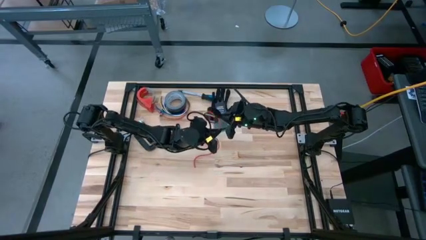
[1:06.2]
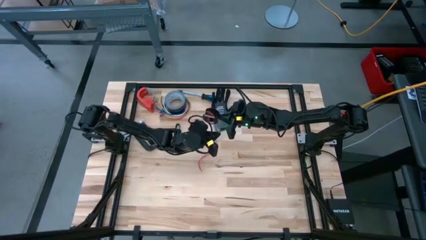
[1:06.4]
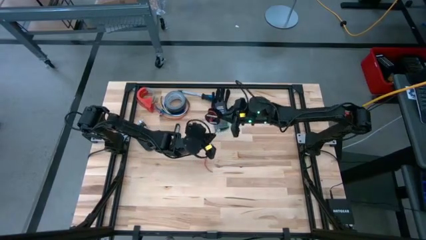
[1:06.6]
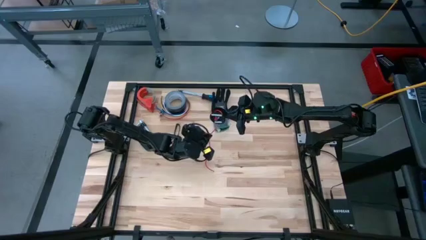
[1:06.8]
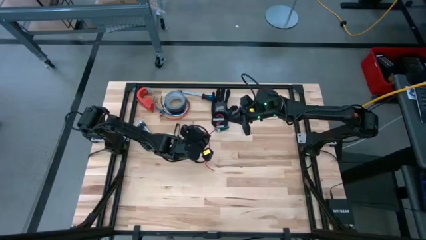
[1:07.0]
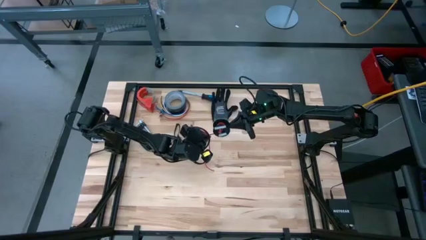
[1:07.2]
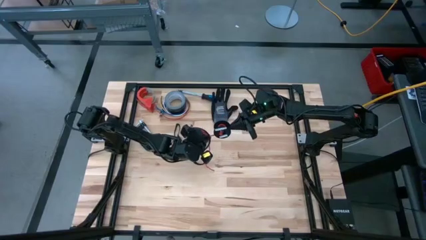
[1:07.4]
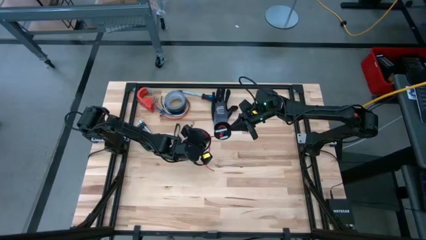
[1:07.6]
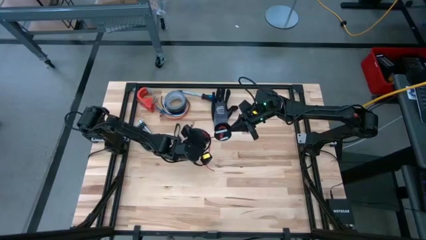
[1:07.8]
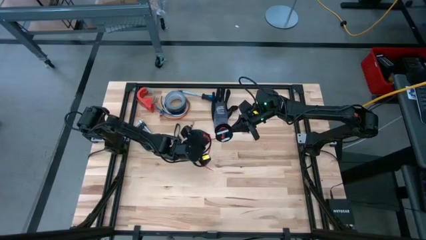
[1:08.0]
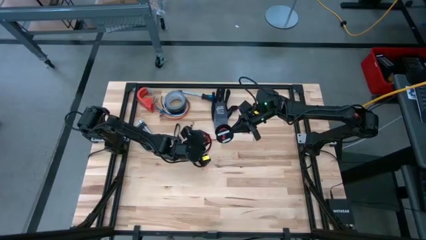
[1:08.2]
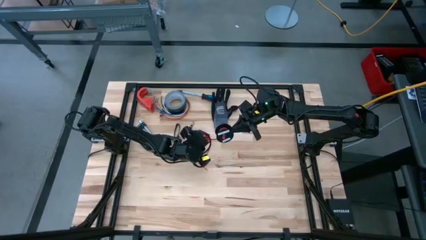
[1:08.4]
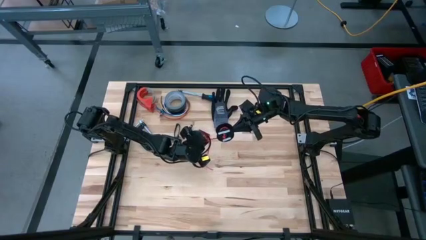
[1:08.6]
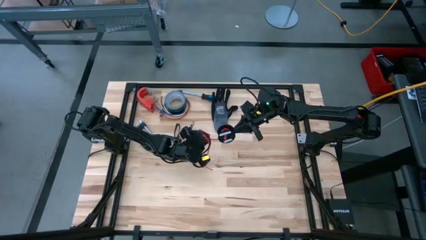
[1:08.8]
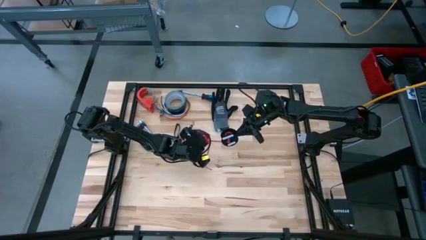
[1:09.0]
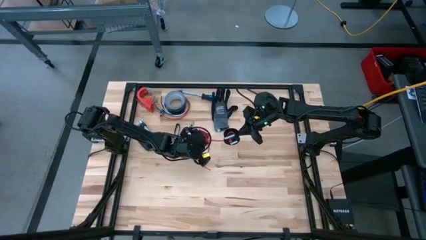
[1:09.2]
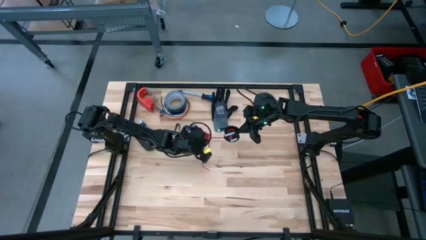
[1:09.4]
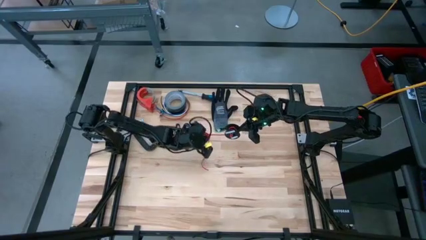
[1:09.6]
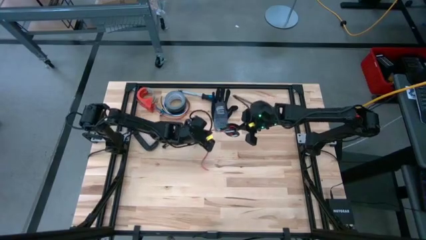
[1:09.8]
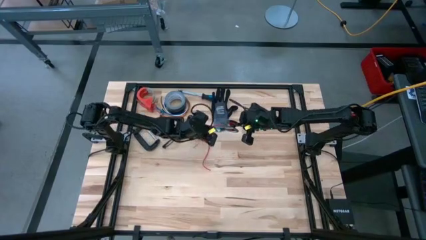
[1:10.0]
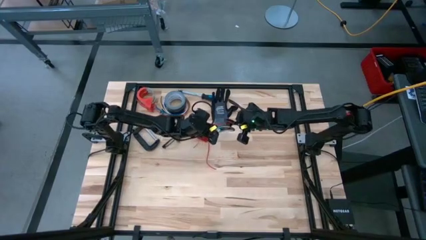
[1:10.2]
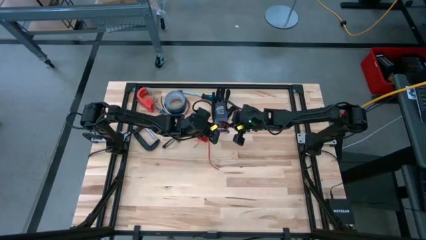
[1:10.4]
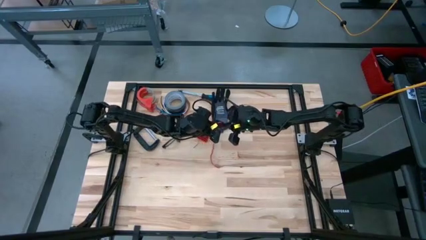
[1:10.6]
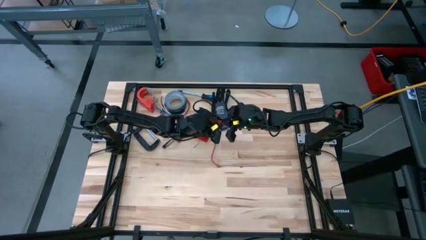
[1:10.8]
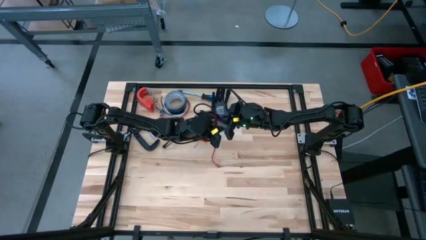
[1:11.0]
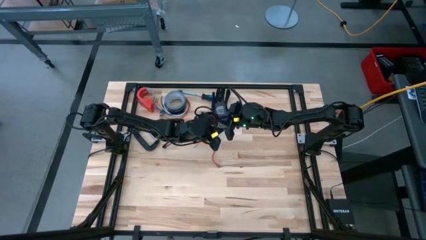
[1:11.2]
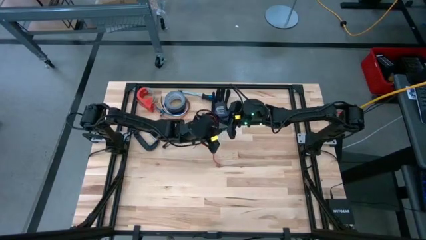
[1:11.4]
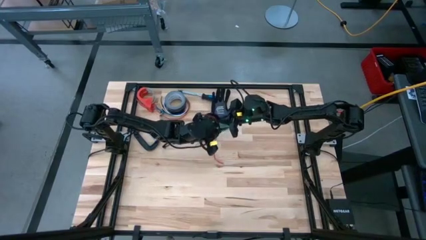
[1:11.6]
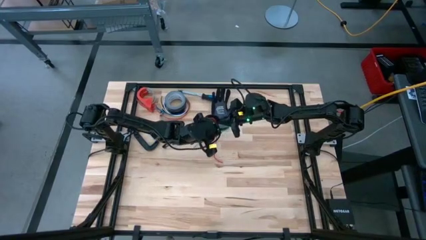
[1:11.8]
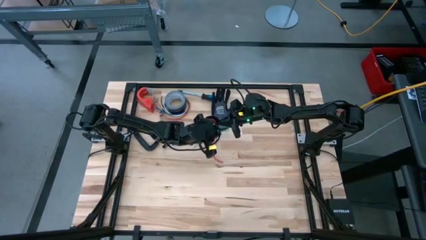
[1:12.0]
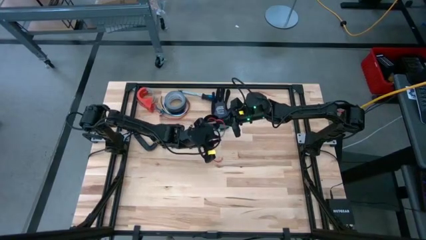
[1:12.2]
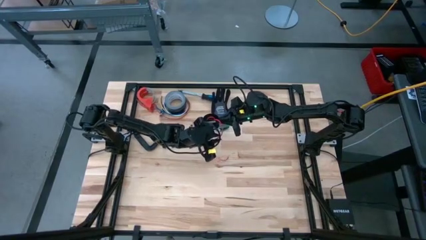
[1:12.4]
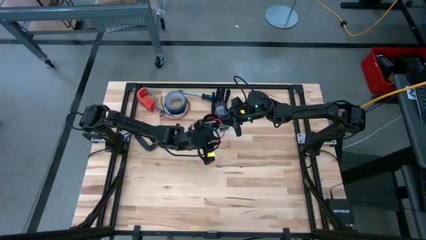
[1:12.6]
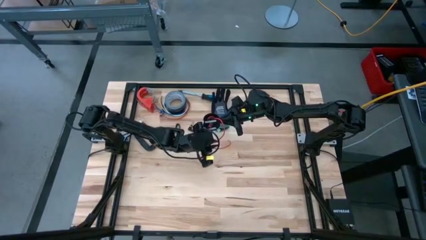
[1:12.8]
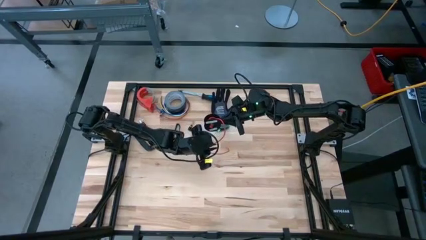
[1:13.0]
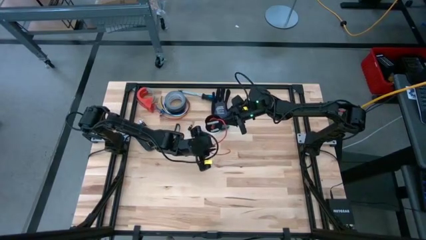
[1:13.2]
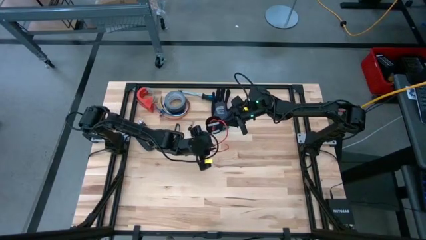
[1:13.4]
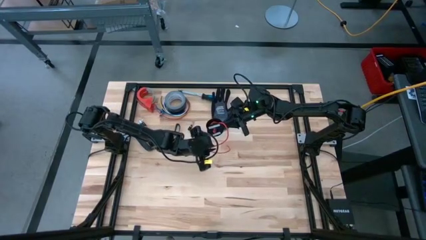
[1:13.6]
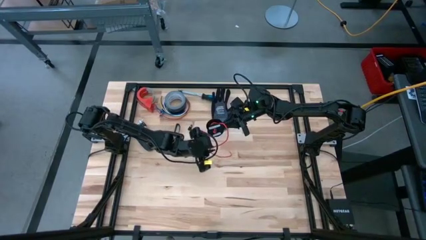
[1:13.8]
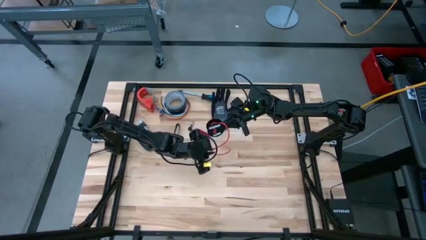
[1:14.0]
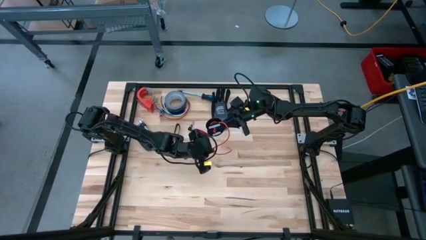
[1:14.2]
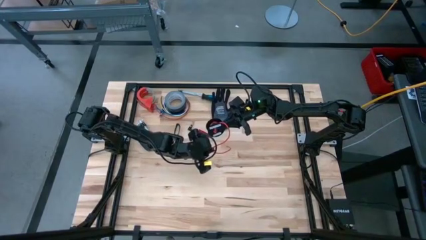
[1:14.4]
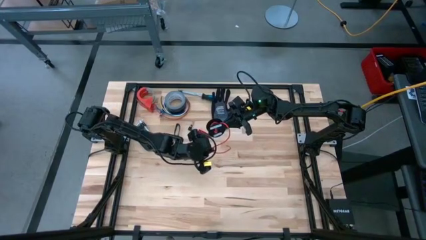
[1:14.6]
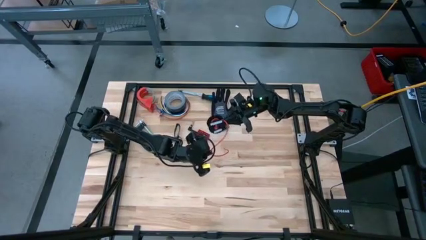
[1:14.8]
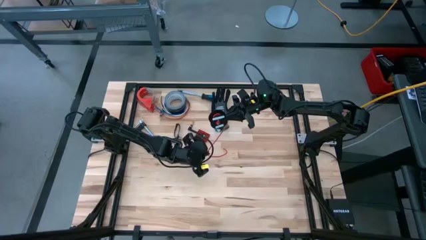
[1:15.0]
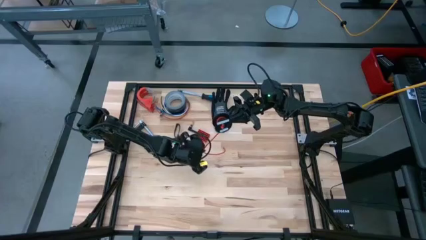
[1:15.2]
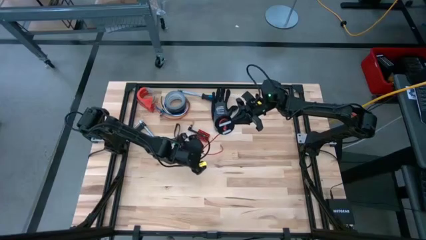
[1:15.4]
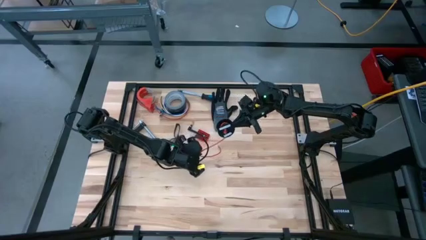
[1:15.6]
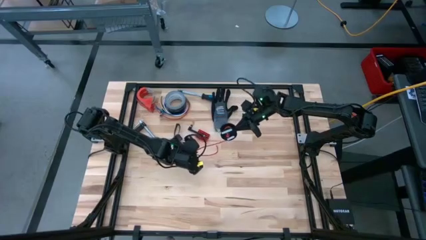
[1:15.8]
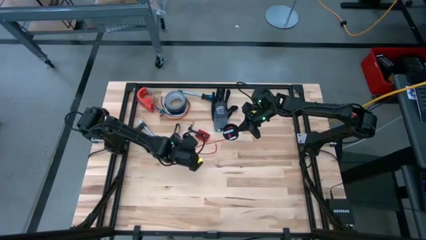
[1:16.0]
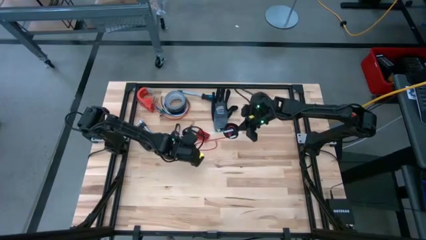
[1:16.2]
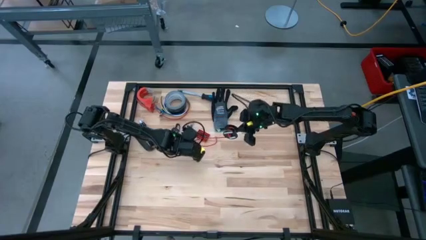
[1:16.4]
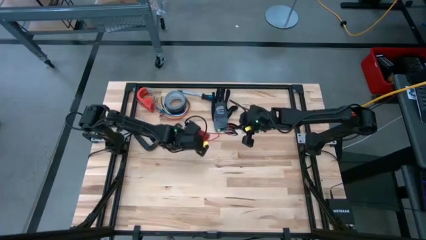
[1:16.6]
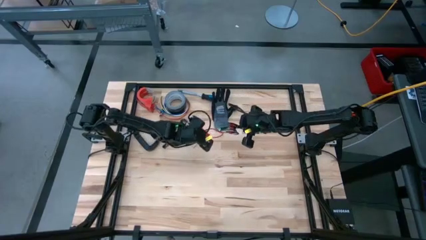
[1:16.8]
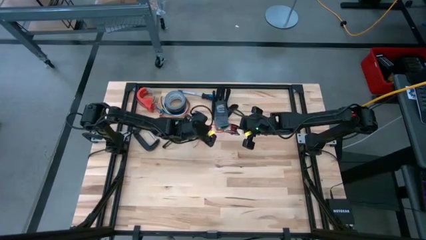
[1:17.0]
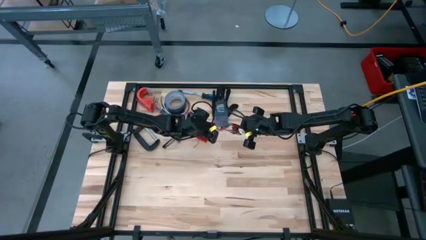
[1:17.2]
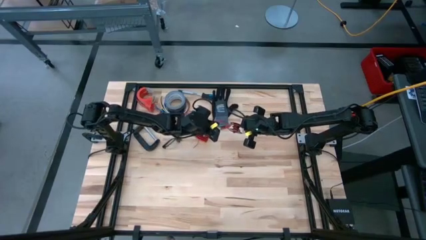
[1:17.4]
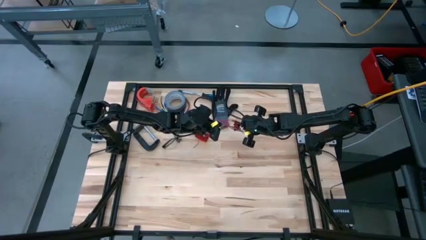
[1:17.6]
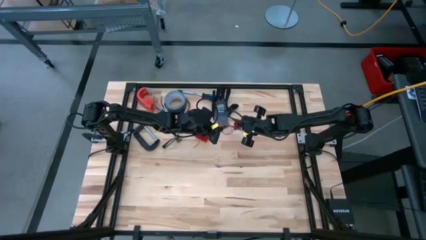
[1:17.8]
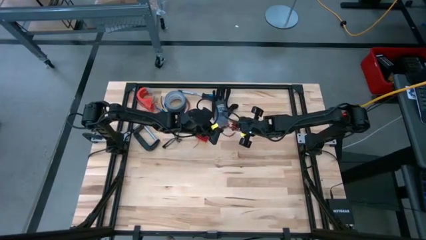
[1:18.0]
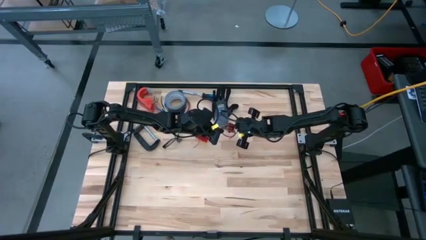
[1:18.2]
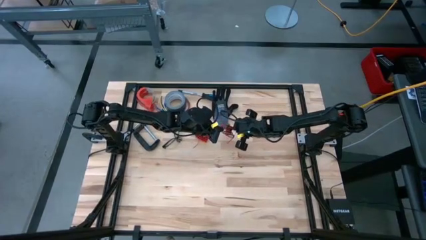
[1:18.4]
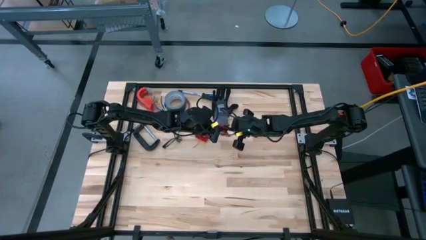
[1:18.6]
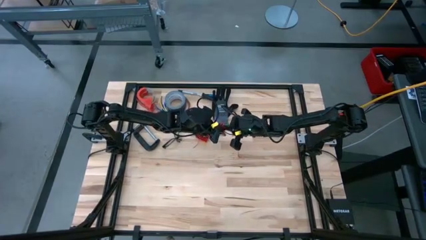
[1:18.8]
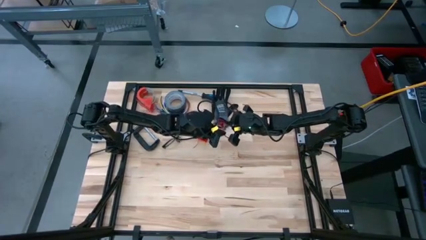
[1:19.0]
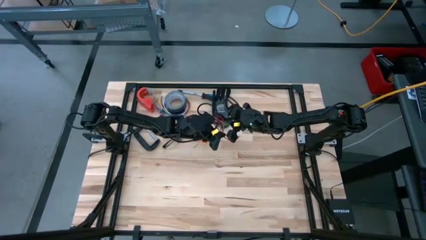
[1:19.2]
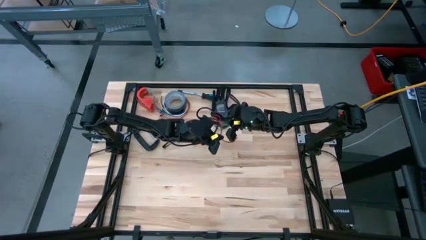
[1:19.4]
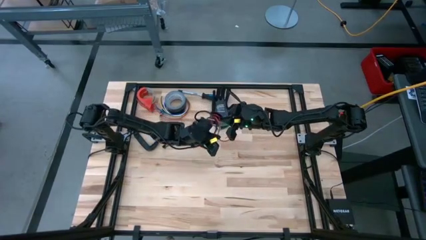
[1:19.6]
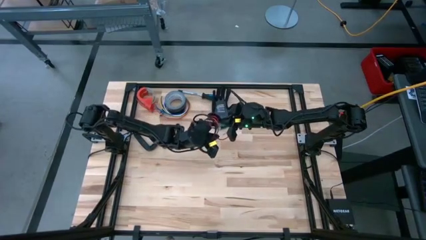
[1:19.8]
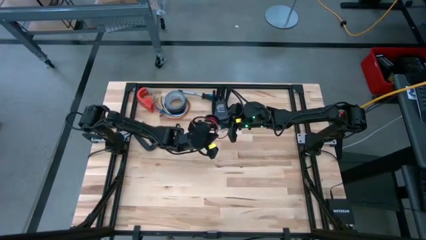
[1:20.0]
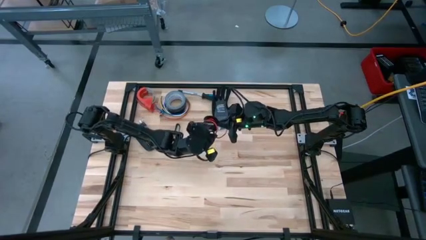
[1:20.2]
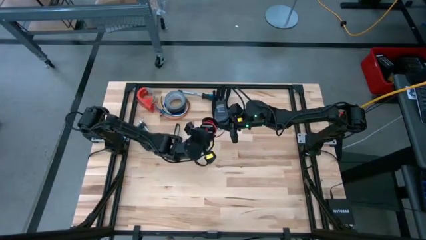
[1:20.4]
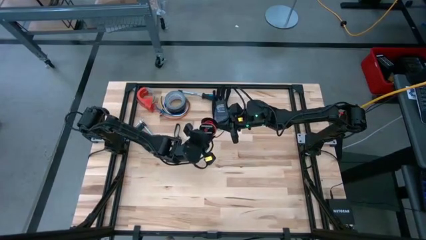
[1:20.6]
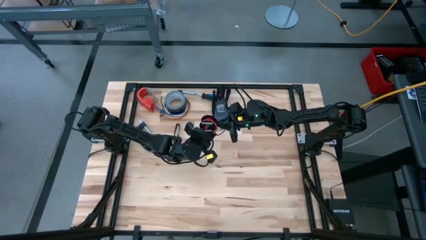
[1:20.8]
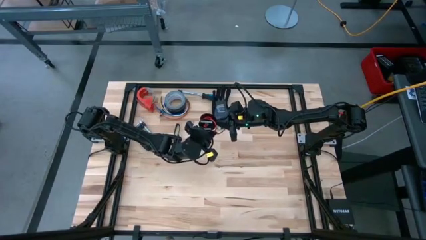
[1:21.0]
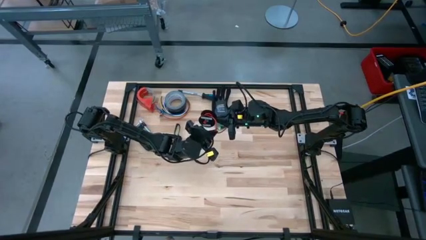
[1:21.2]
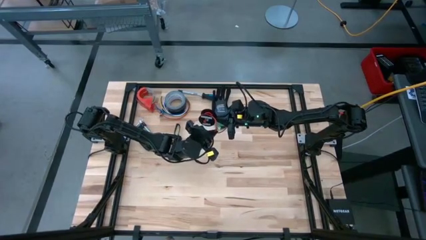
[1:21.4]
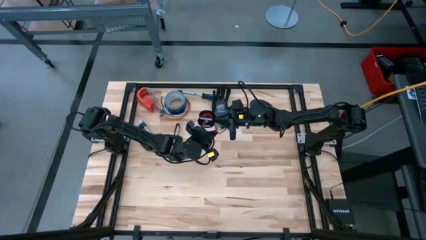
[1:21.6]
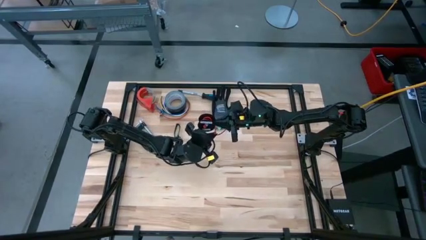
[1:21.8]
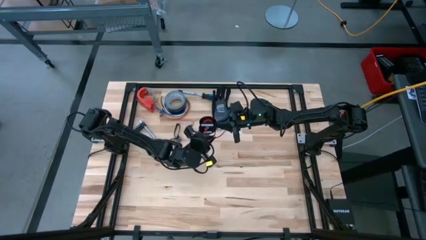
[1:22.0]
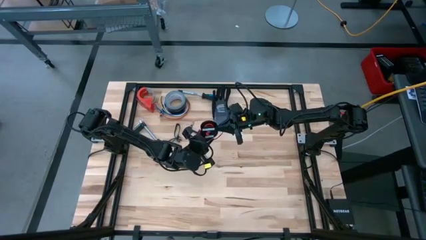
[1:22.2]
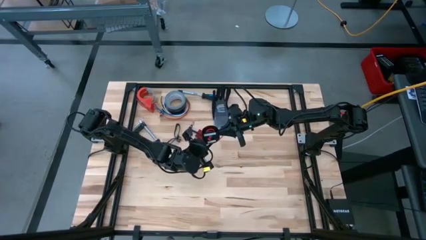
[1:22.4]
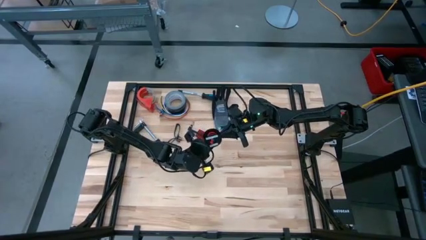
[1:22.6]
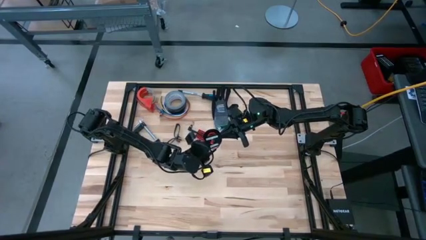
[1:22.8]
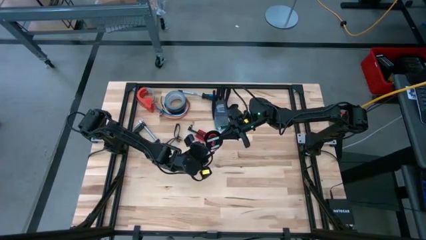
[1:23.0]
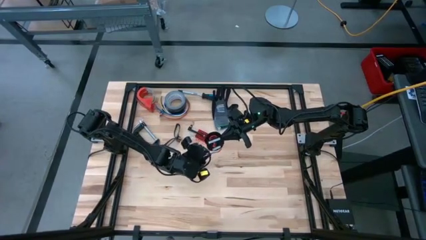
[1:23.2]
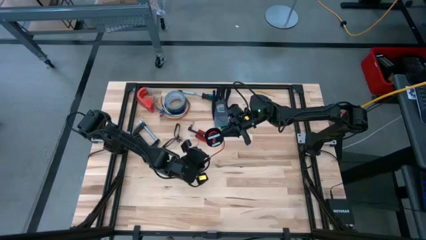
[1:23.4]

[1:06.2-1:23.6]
Task: Coil cords
Coil the orange wire into the black spool
